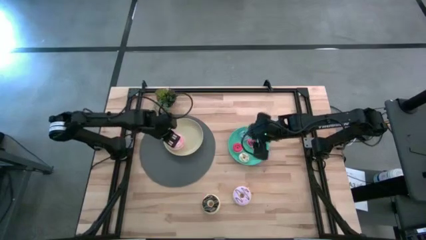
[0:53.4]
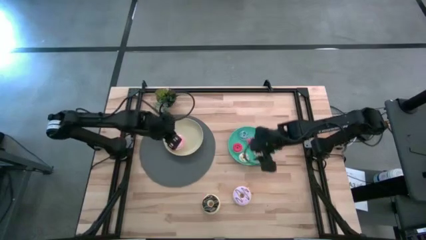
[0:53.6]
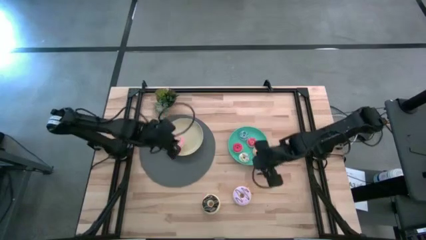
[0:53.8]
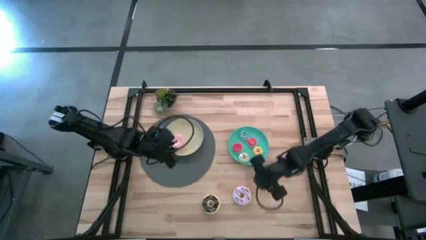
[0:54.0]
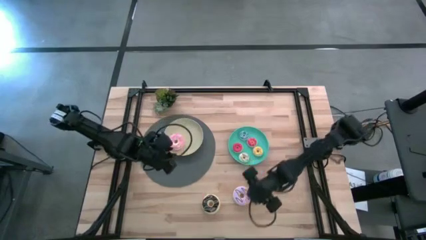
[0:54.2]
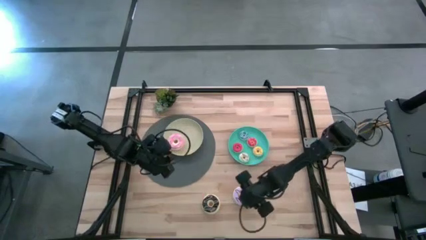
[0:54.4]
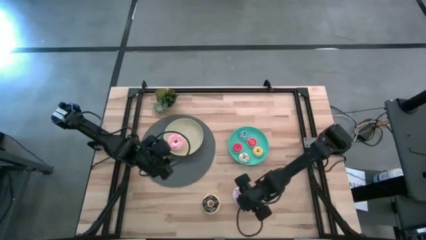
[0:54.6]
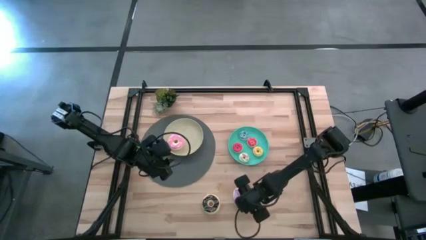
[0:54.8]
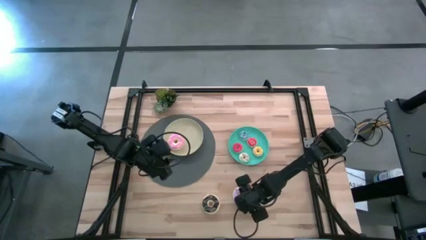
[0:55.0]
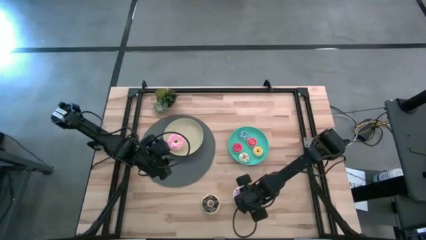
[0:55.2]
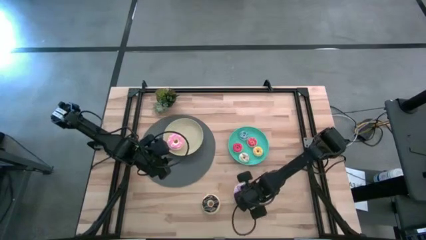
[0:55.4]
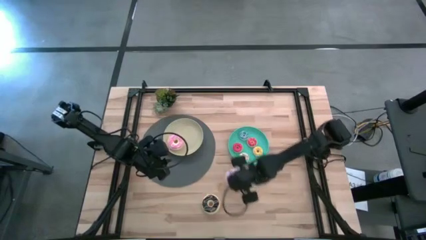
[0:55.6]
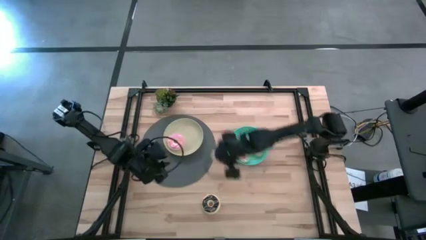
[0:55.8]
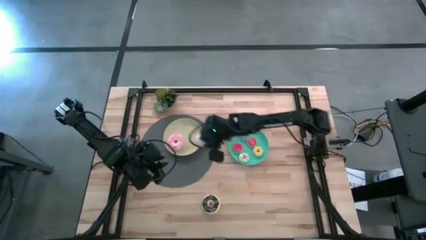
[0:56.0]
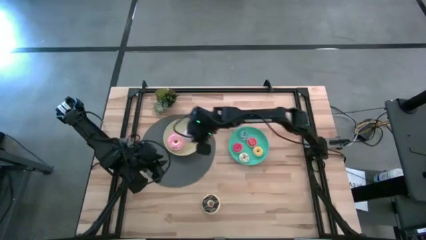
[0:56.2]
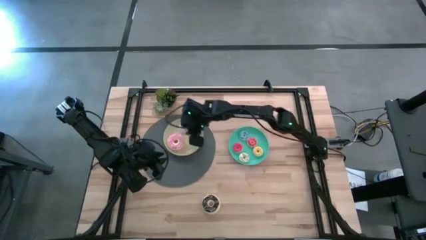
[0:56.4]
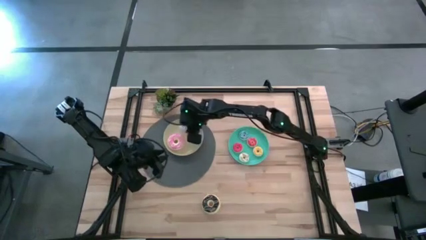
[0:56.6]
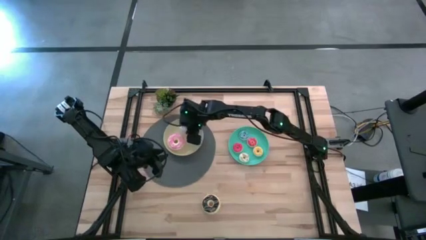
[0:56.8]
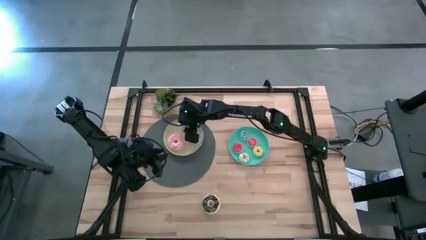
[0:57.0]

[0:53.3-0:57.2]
Task: Pick & Place donuts
Put the large violet donut on the light brown plate

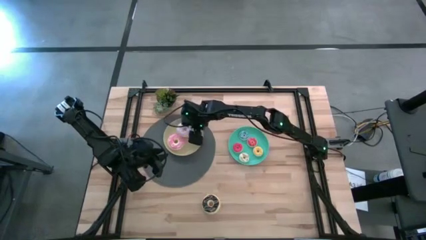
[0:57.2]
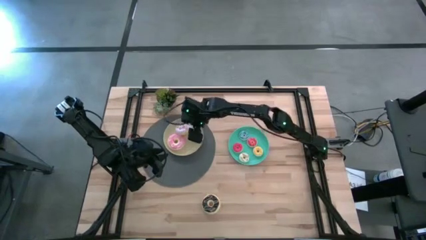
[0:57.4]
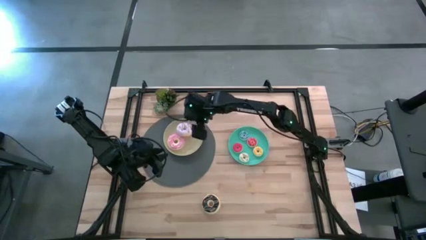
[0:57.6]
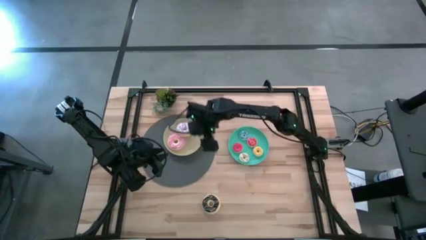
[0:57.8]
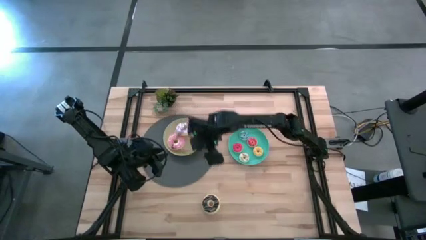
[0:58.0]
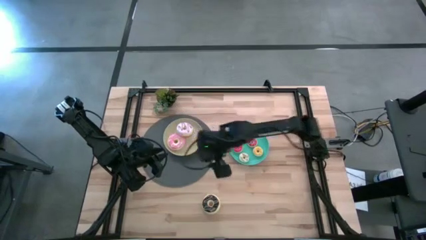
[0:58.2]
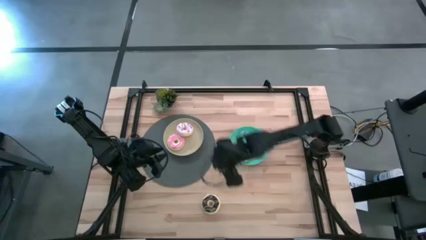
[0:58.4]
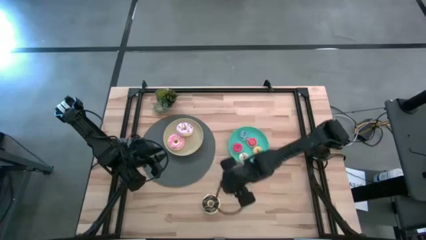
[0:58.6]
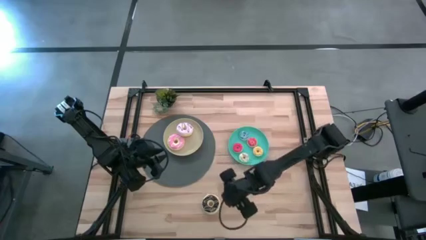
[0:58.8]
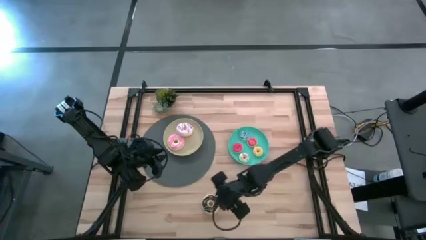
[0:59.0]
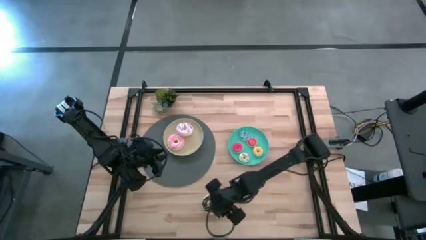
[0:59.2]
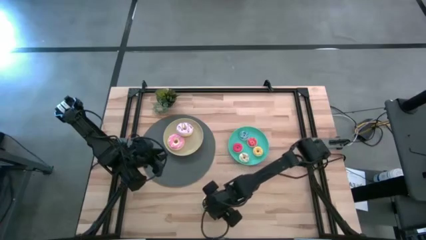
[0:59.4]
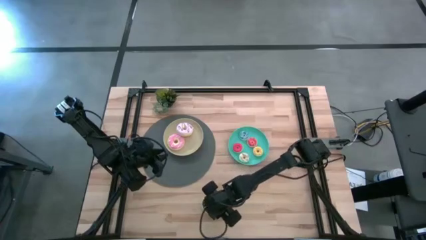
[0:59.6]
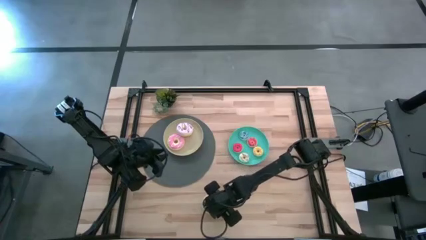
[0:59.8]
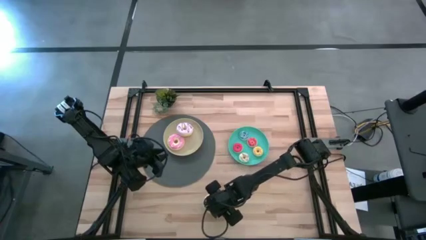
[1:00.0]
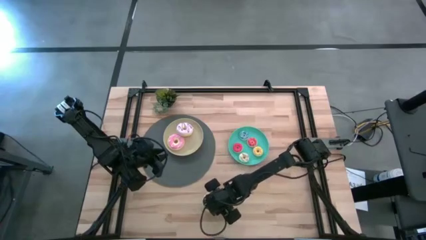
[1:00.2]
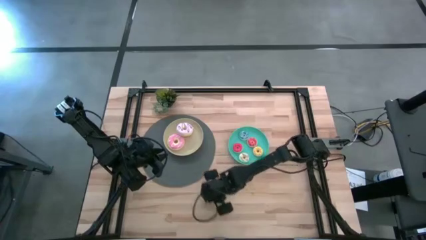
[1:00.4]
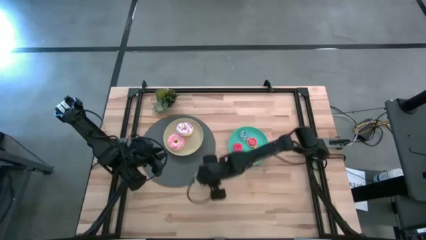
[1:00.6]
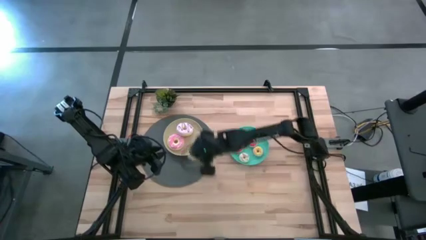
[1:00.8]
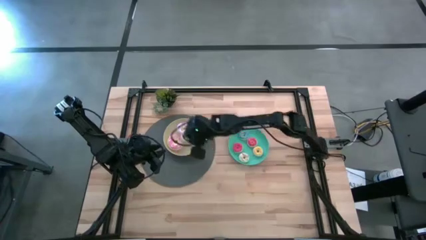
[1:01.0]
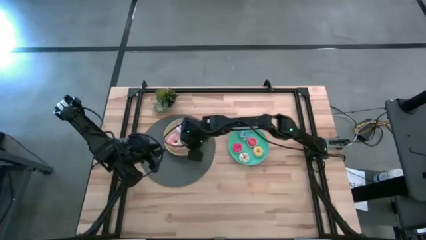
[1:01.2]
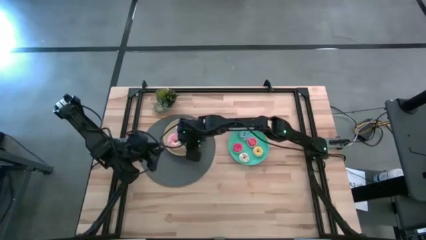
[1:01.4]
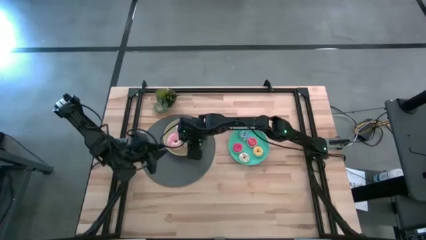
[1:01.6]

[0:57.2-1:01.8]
Put the large black donut on the light brown plate

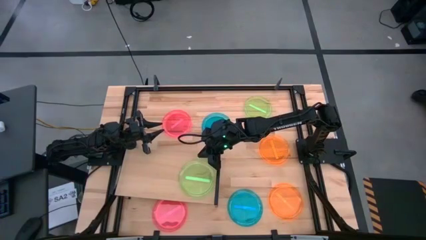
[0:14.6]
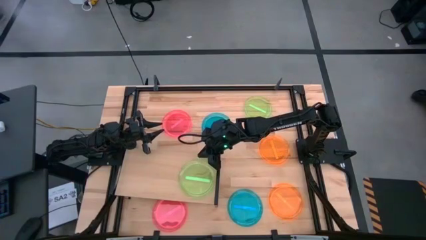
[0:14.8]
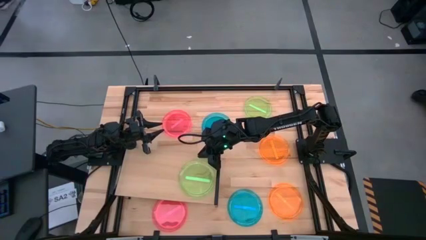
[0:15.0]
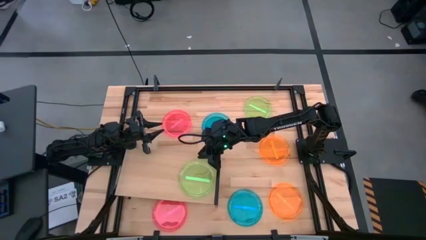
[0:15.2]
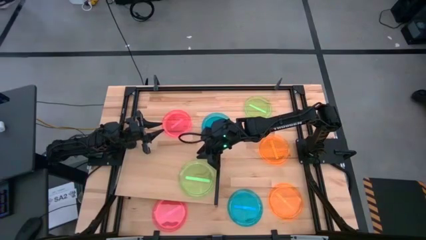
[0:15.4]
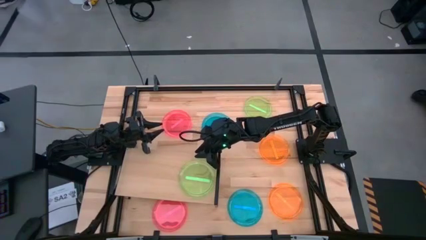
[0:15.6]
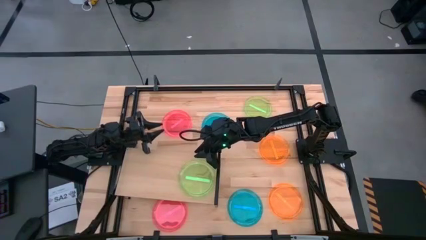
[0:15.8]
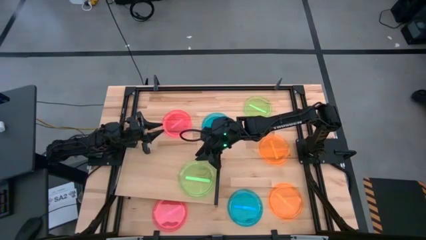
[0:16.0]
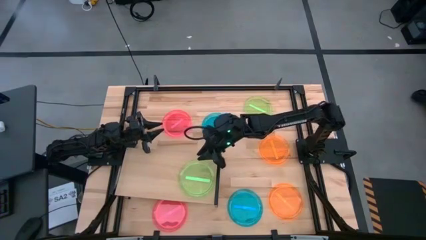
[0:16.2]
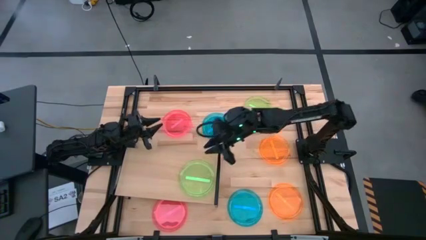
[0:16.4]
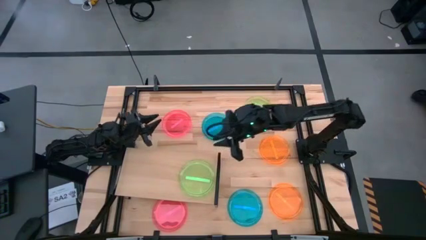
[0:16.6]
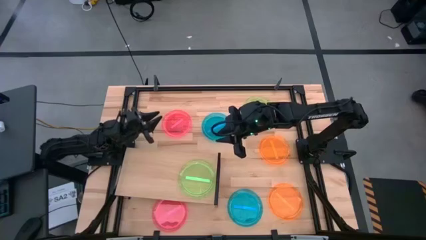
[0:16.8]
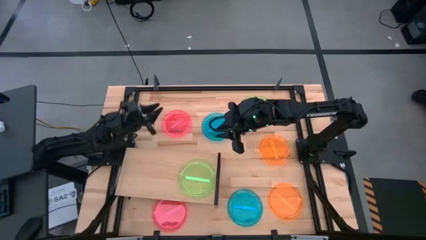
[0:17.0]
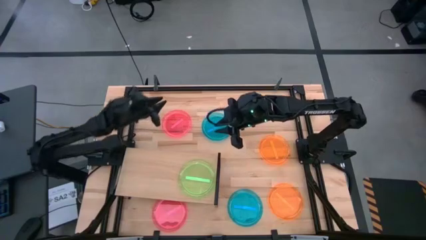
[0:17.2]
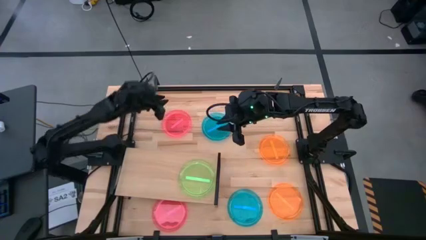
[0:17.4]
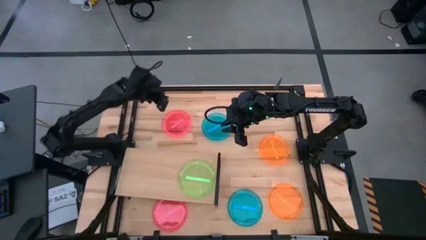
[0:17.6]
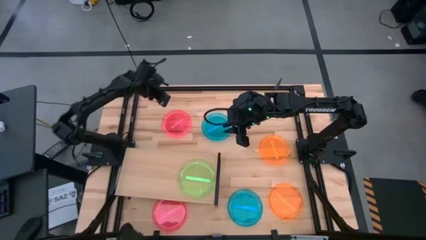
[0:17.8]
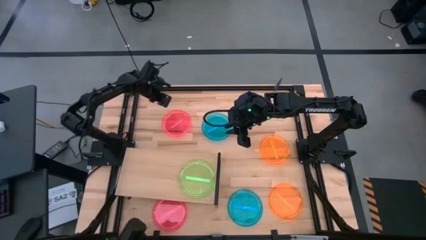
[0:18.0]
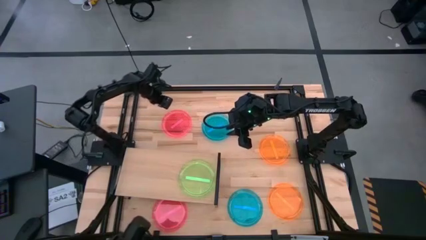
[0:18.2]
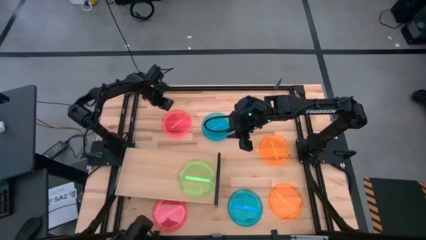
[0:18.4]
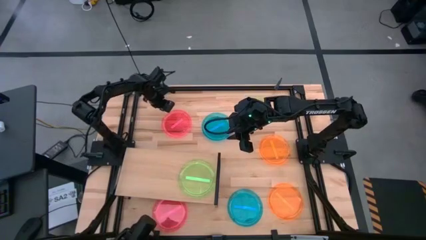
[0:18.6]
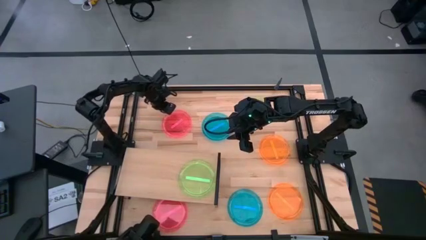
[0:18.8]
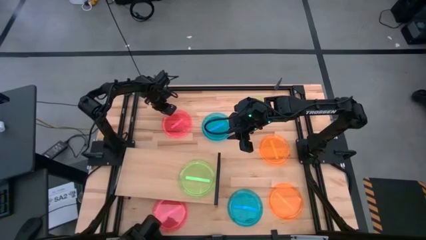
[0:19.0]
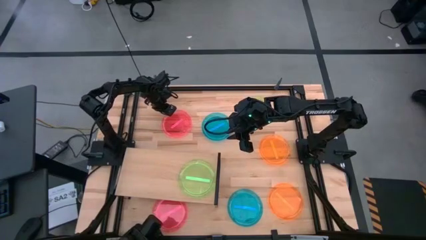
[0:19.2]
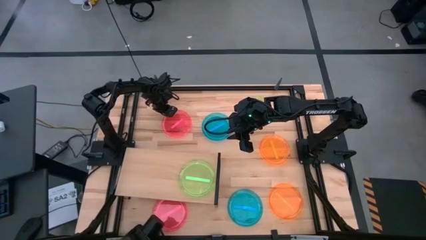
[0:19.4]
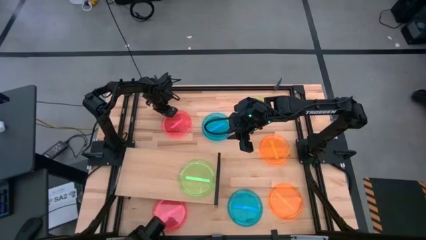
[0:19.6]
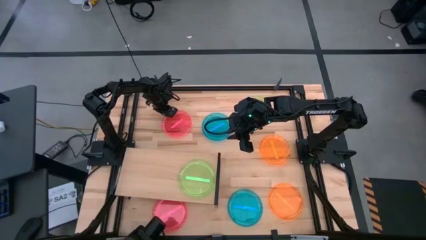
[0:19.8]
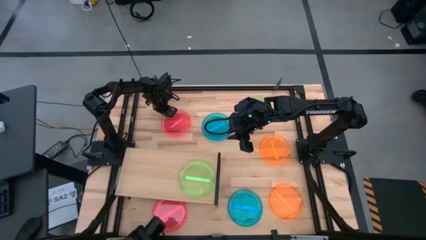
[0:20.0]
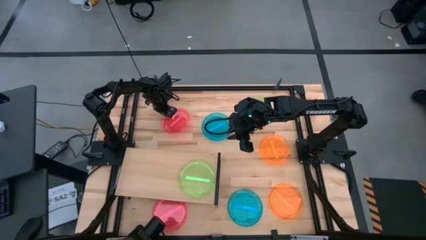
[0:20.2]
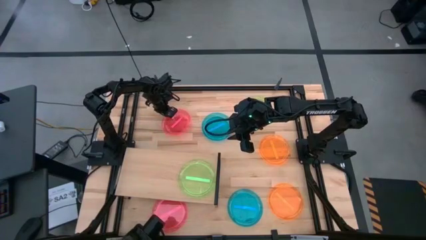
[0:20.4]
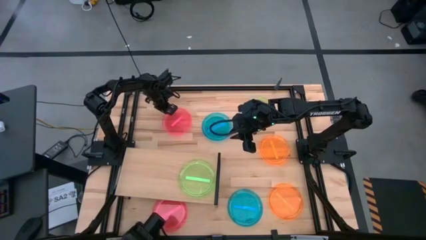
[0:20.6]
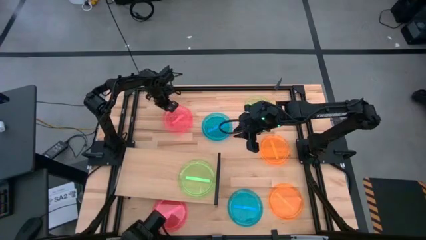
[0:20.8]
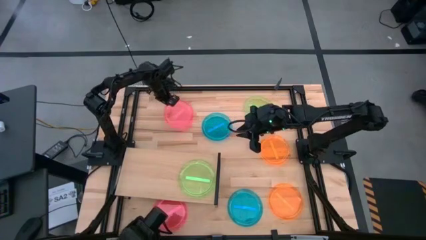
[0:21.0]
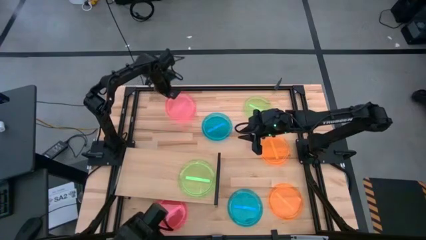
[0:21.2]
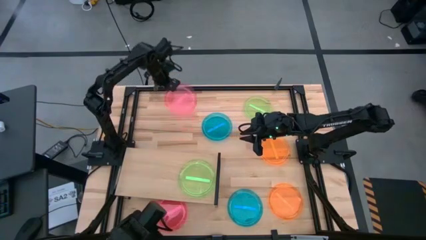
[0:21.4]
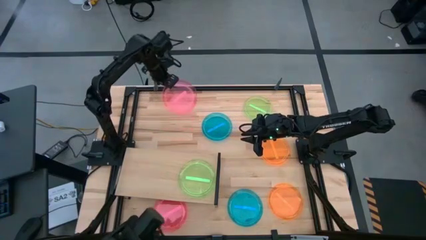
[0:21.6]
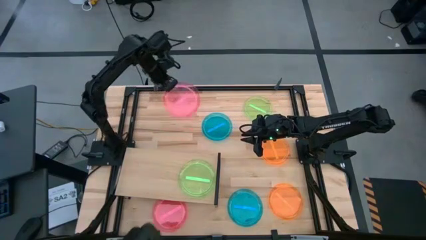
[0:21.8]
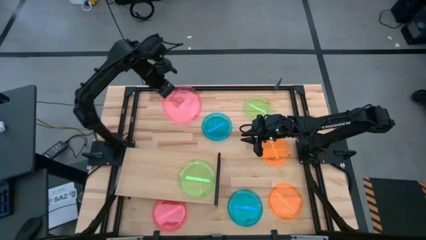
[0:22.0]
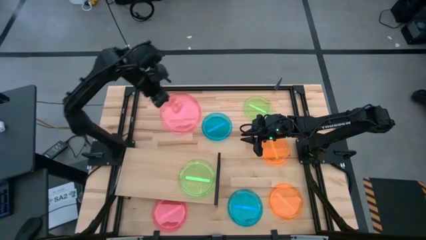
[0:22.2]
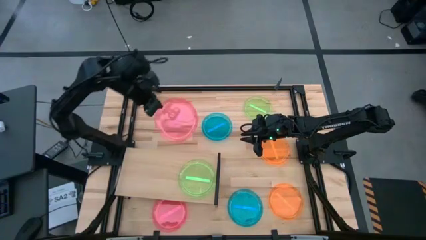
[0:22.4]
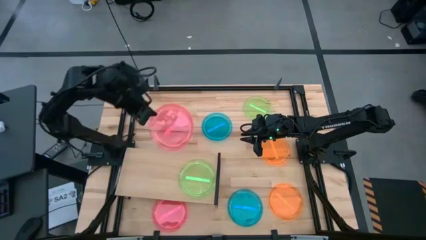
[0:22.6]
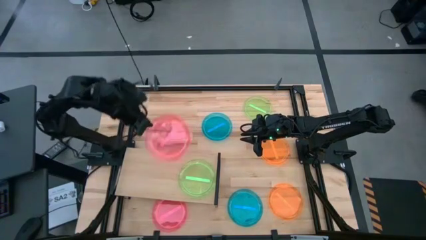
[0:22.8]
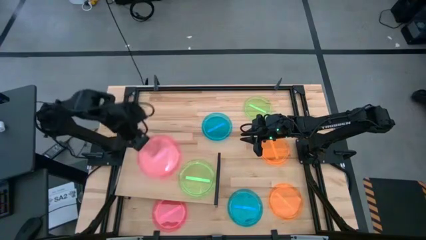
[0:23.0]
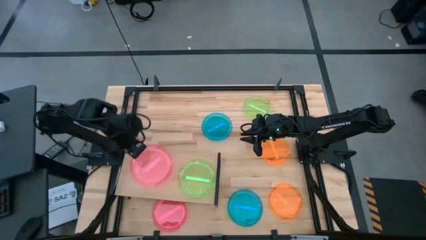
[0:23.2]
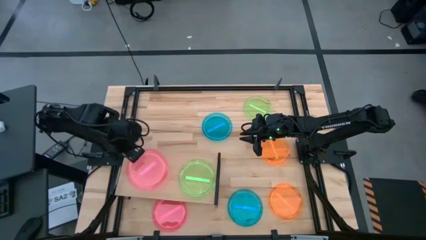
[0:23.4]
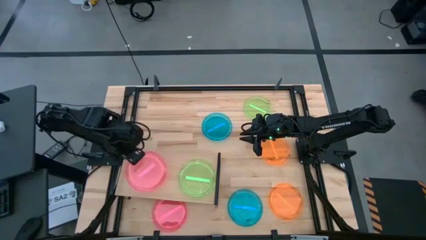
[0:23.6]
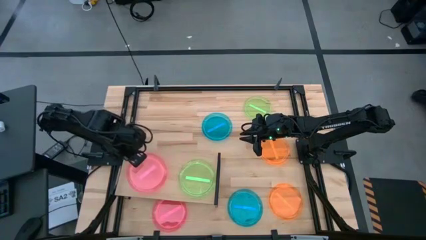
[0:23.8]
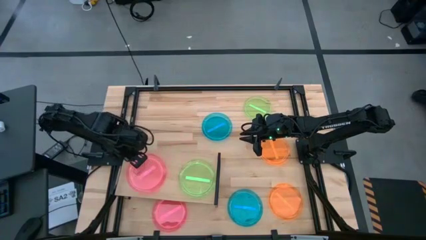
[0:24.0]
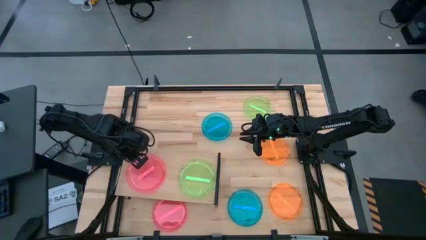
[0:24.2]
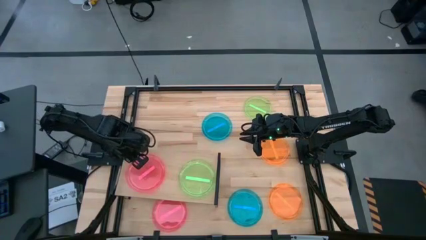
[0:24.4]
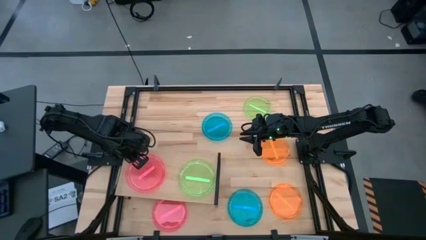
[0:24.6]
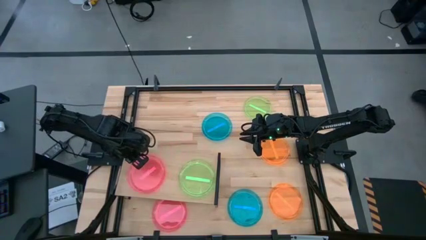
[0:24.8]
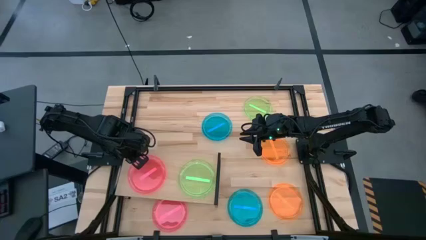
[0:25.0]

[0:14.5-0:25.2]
Task: Place and stack plates onto a shelf
Put the top red plate on the shelf
